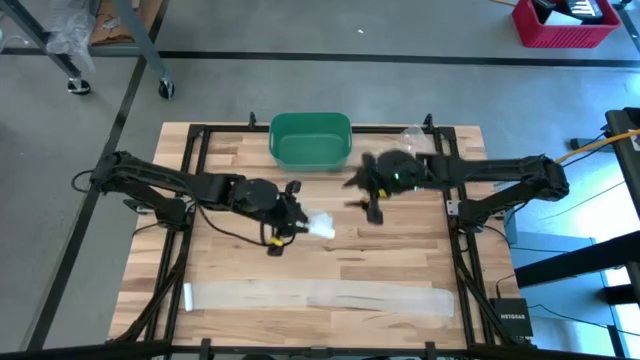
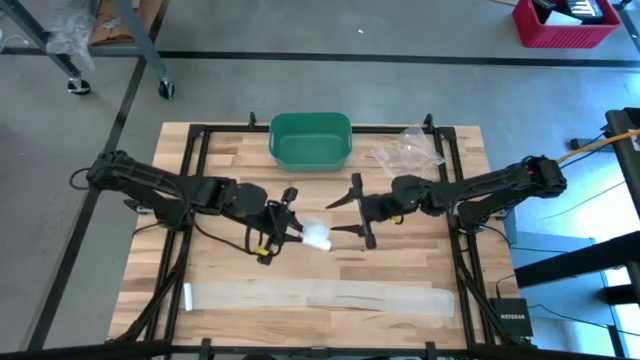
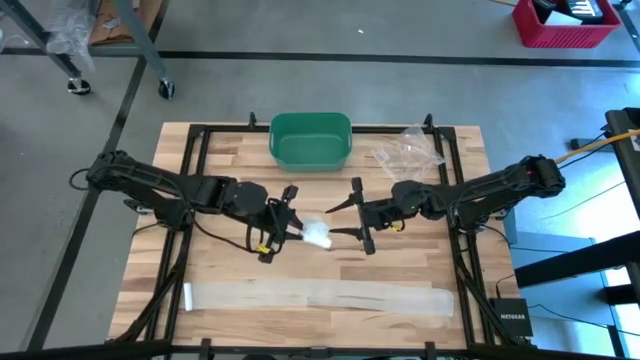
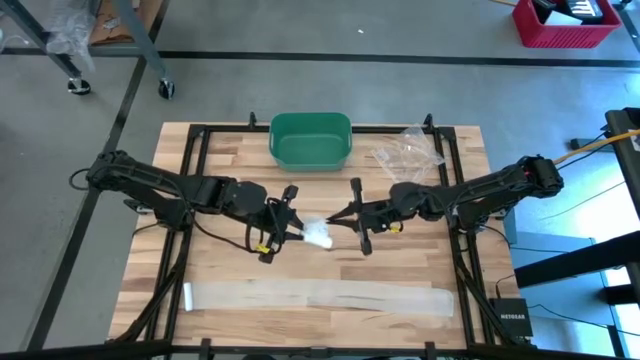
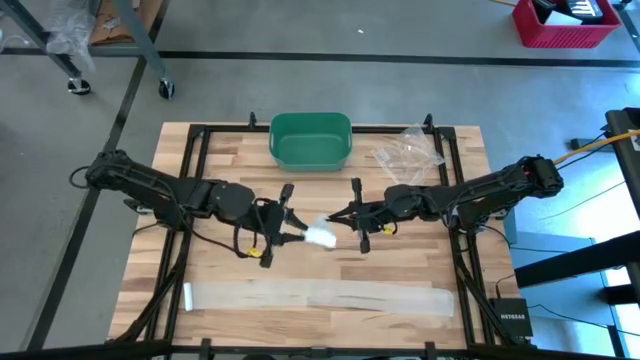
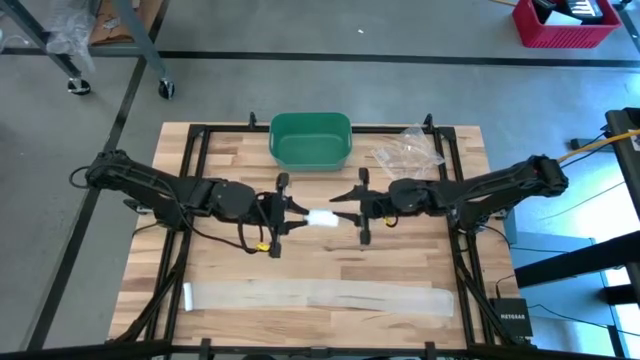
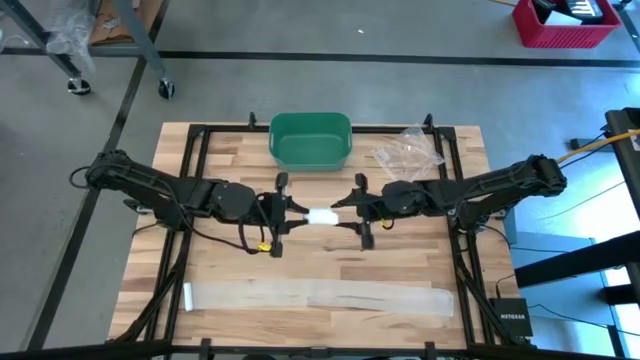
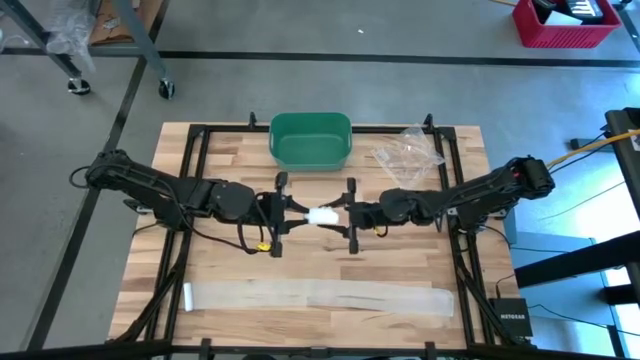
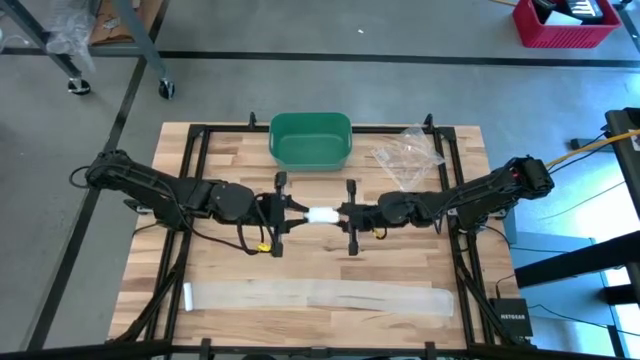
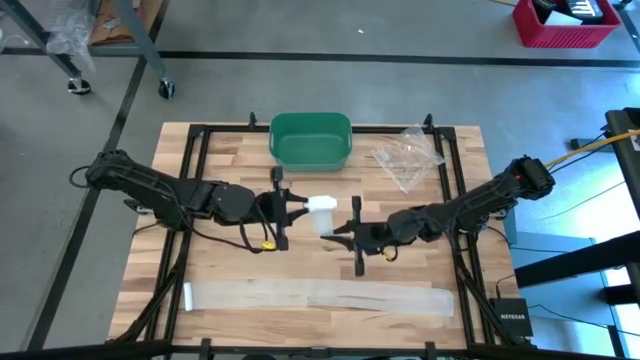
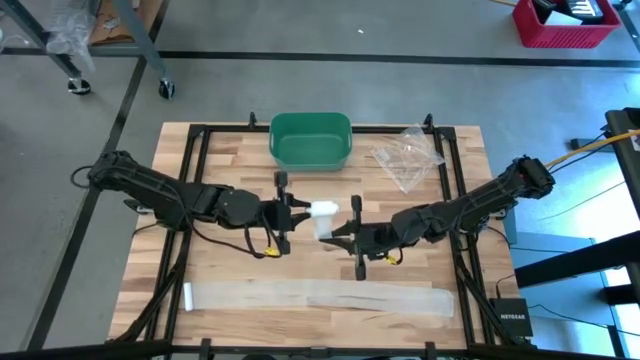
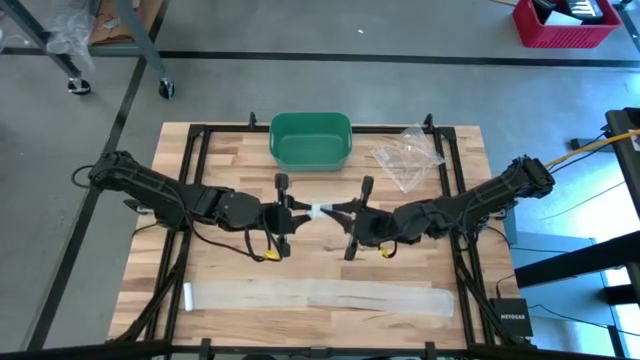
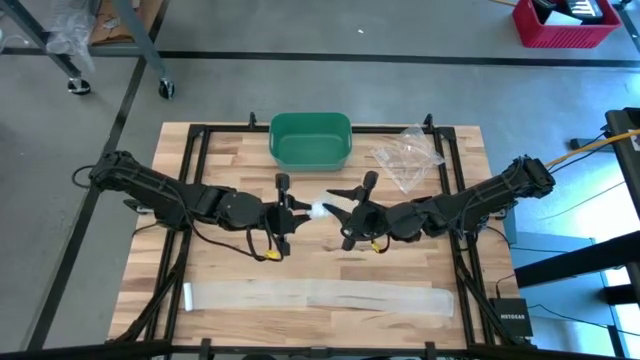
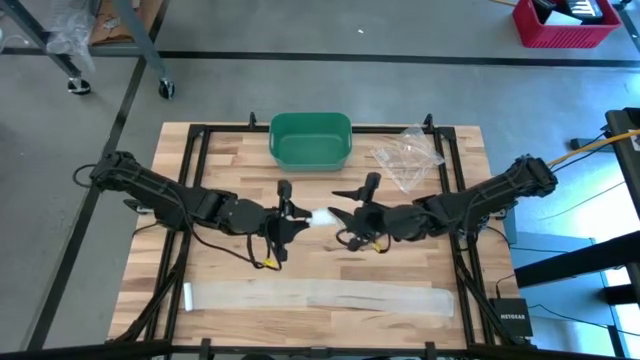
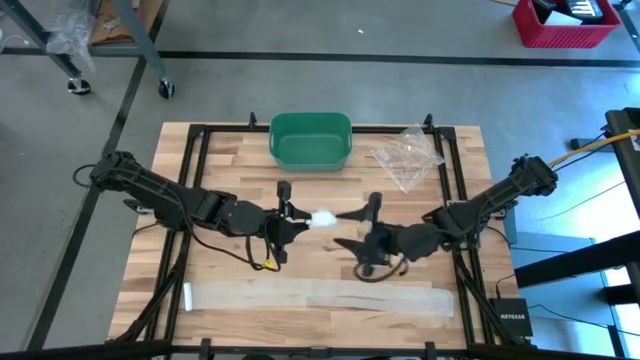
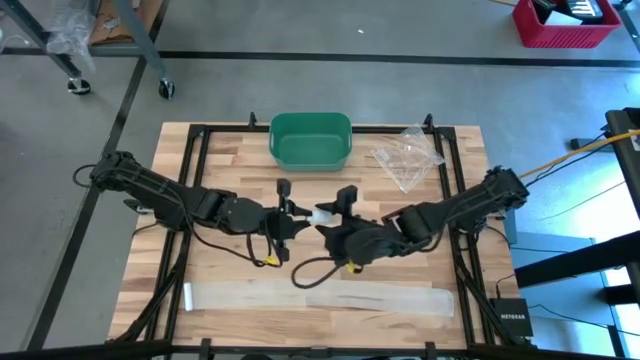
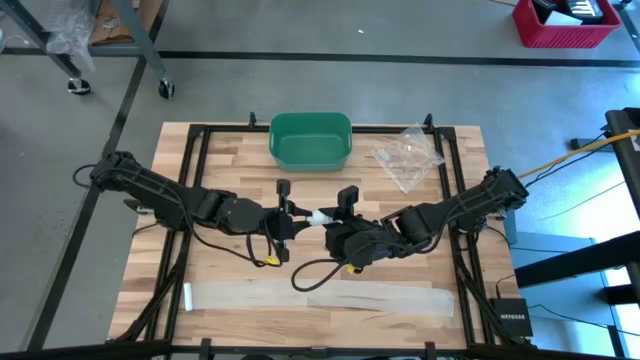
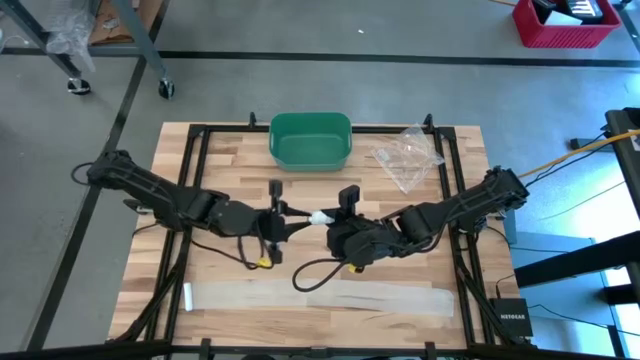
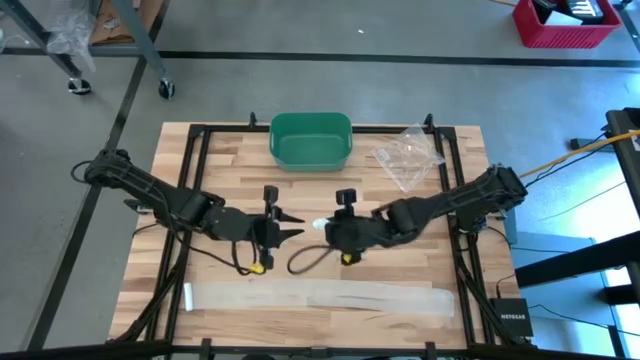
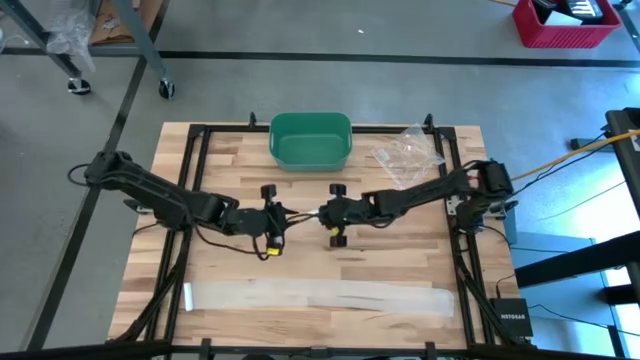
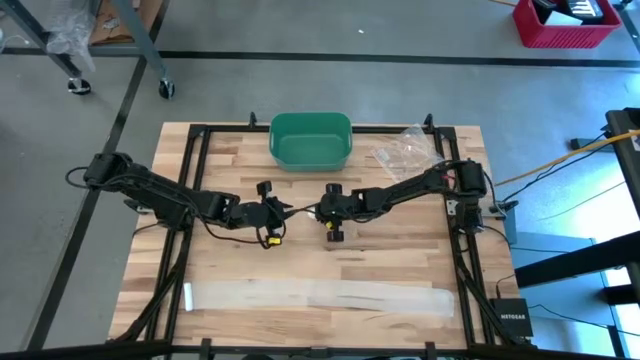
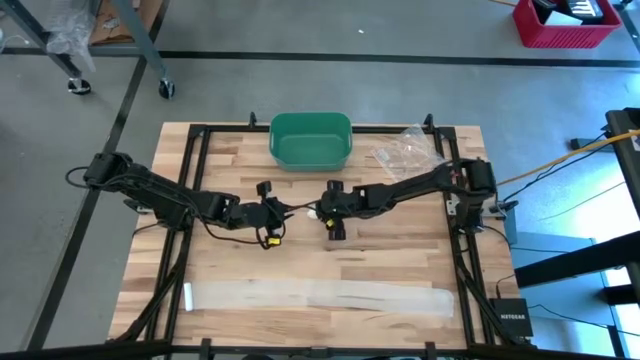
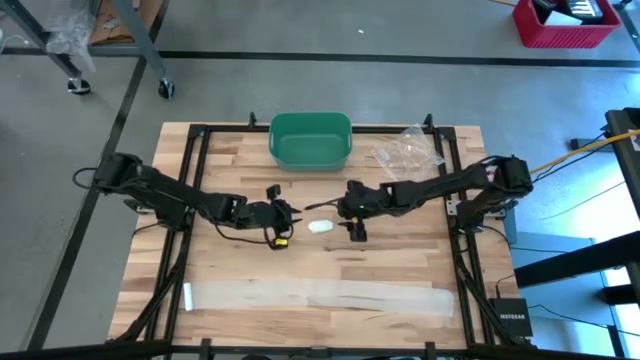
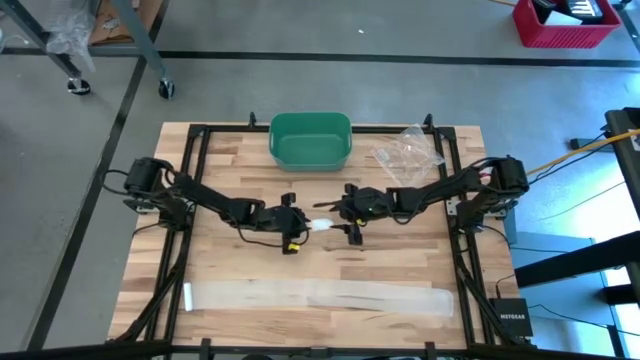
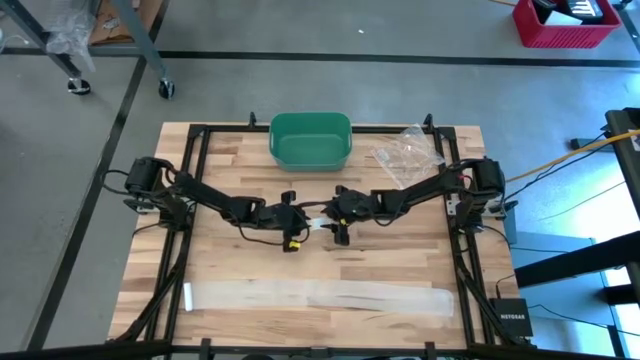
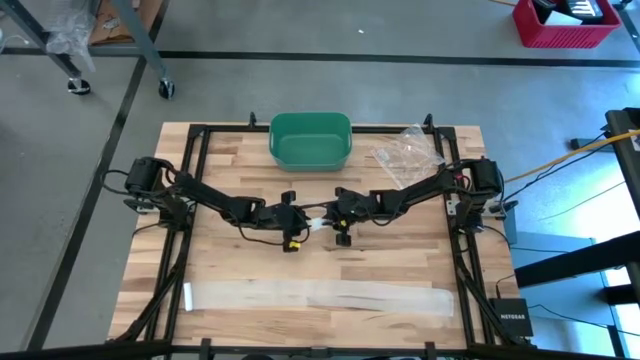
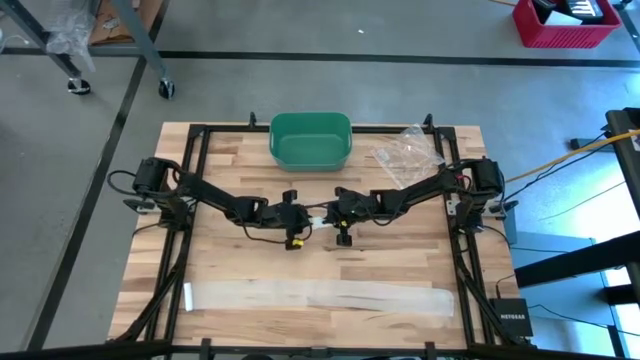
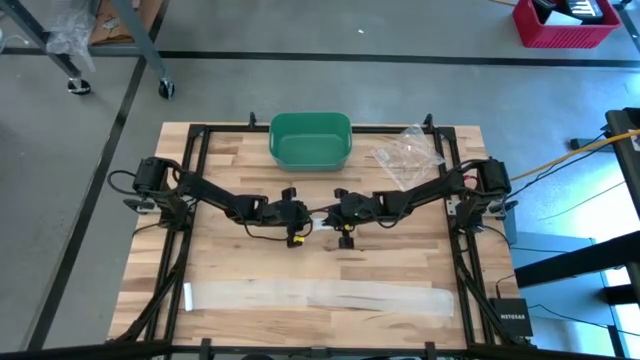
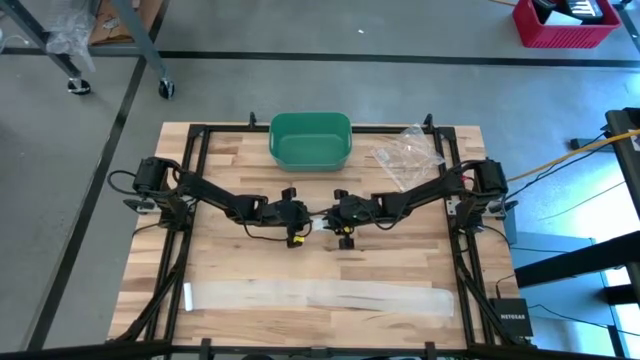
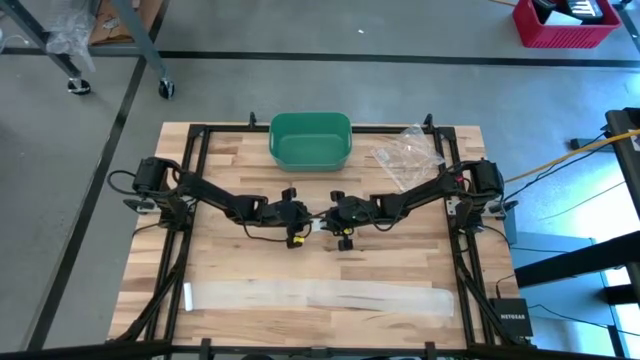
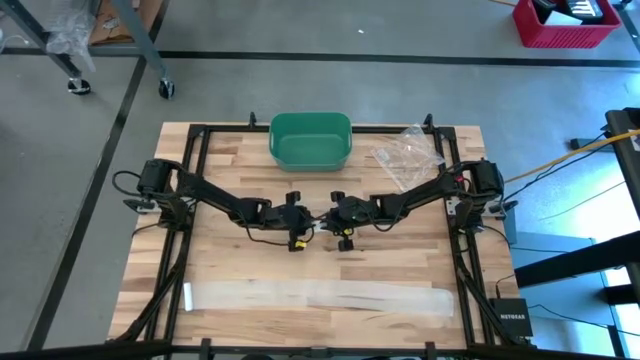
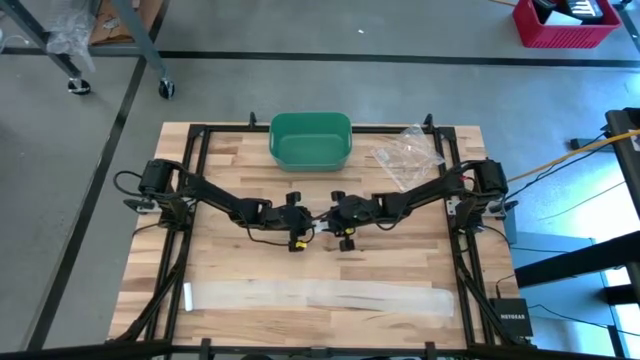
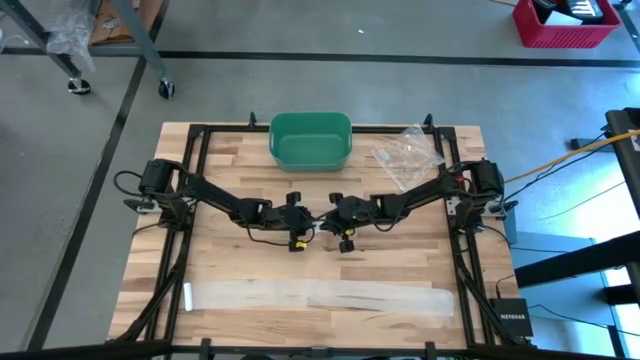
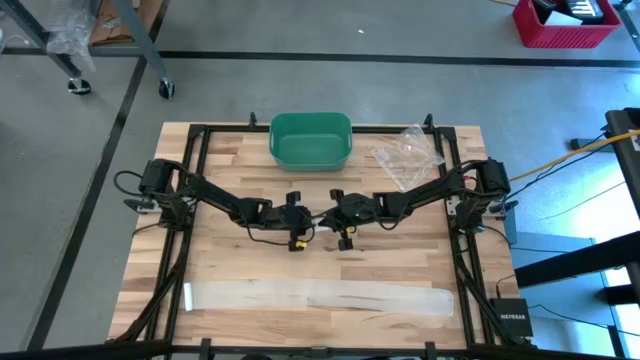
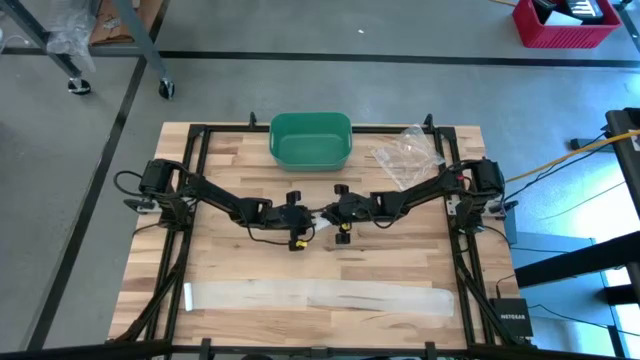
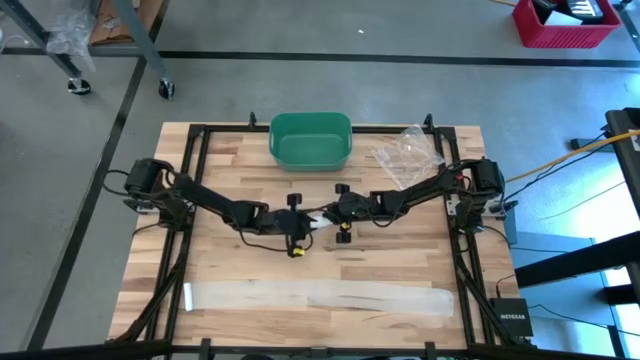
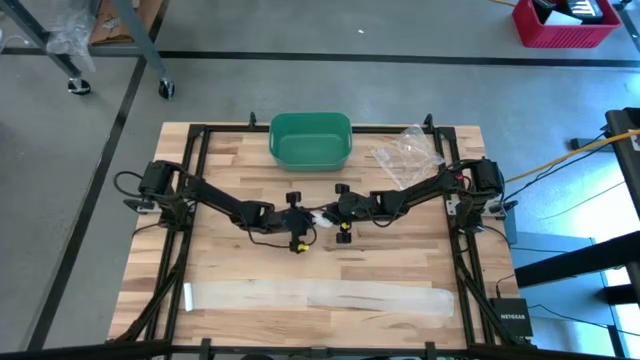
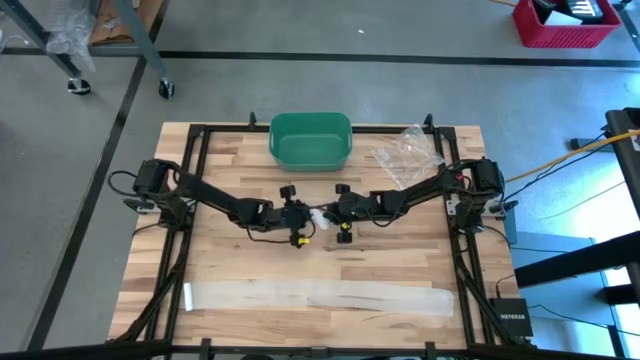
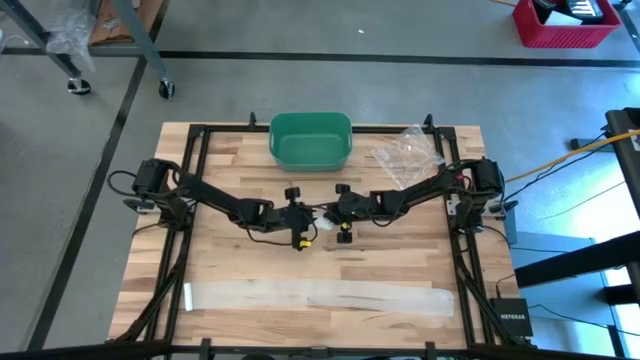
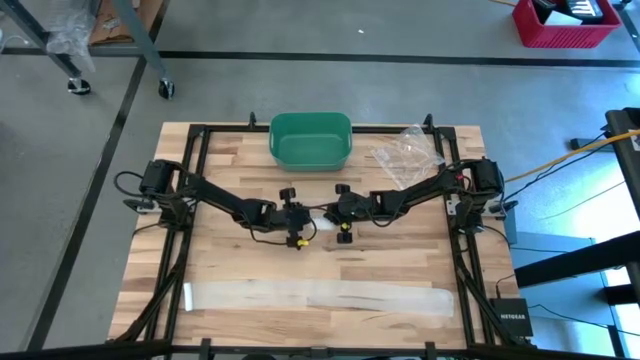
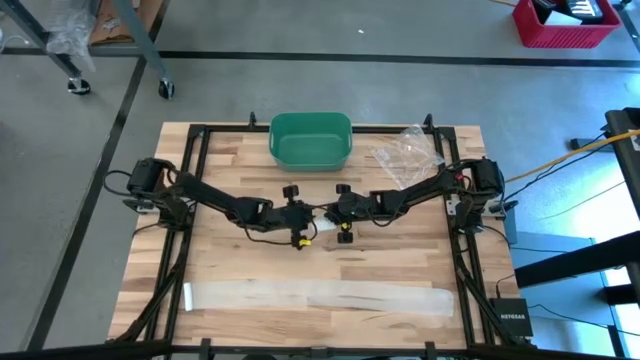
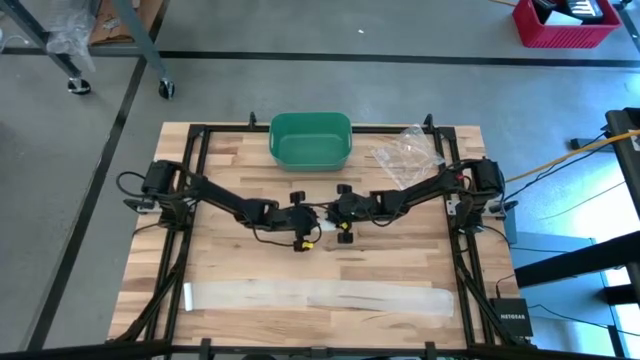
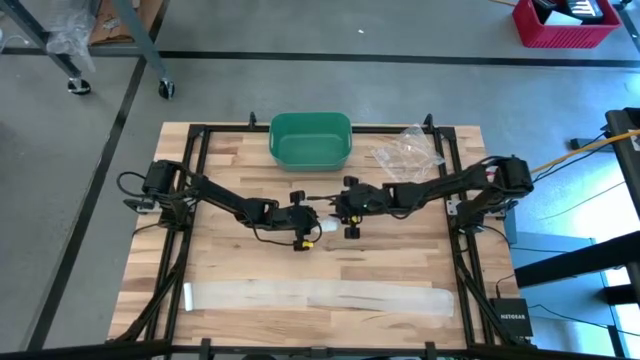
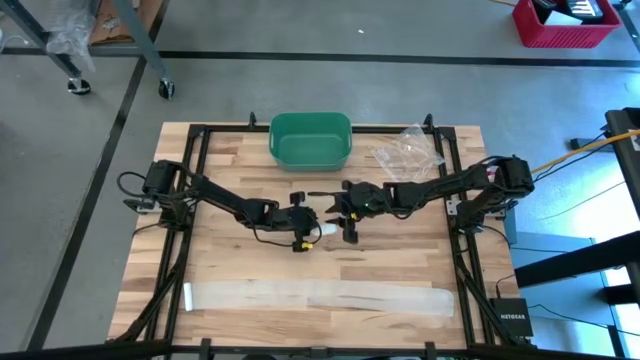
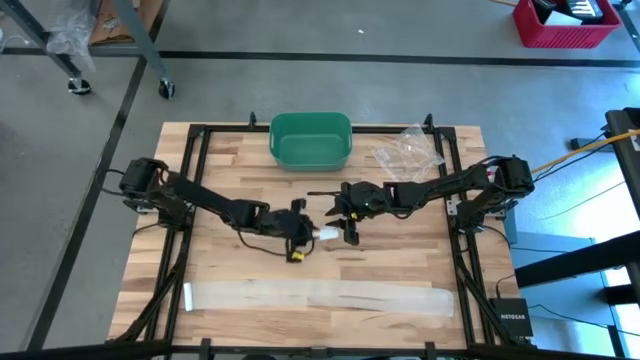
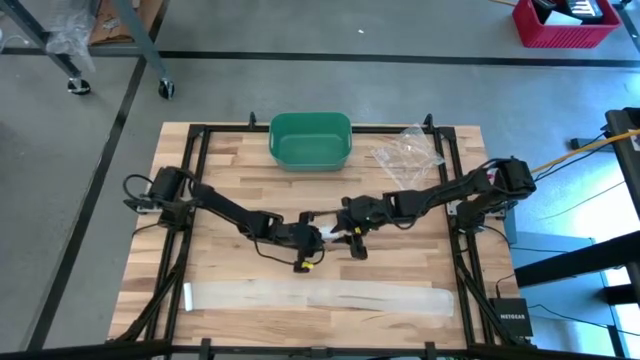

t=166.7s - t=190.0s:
Task: Roll bandage
Roll the top white bandage
